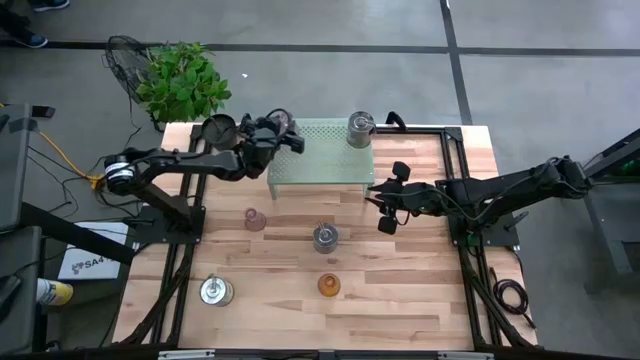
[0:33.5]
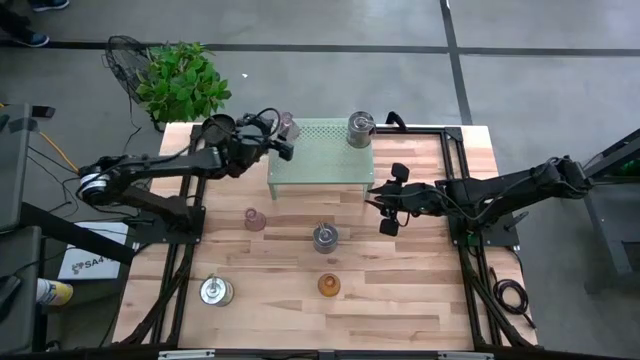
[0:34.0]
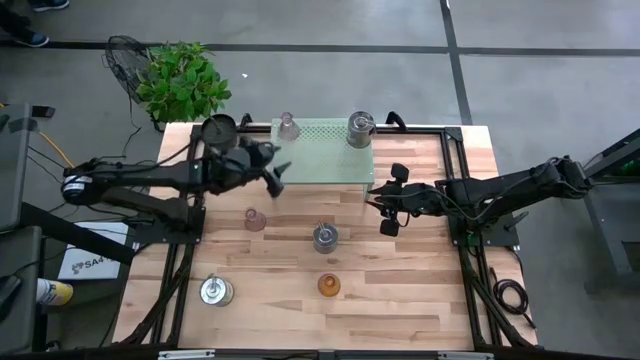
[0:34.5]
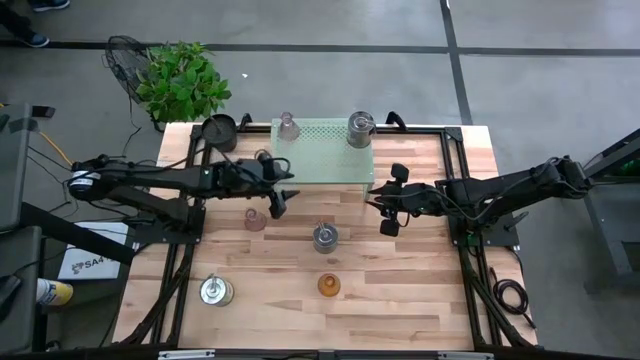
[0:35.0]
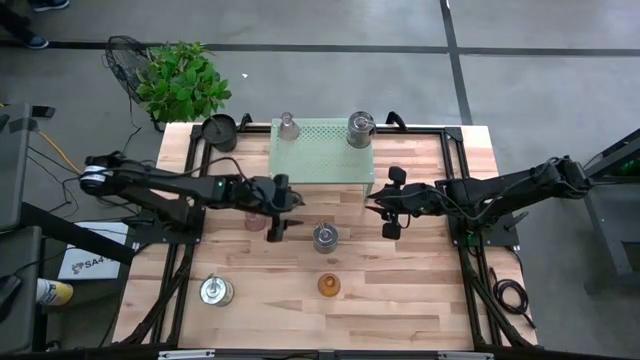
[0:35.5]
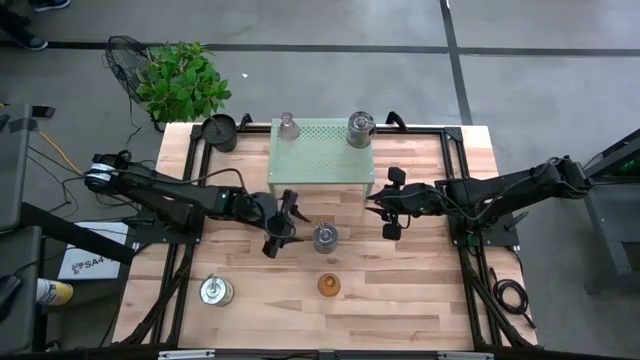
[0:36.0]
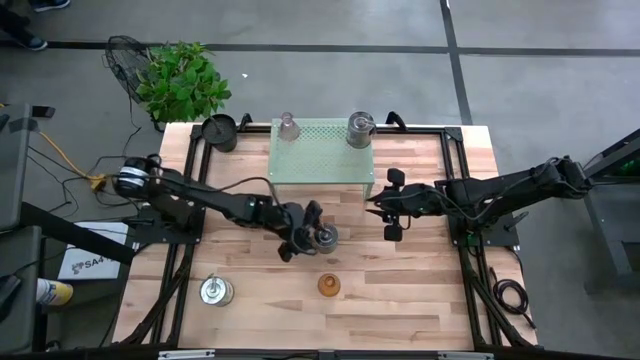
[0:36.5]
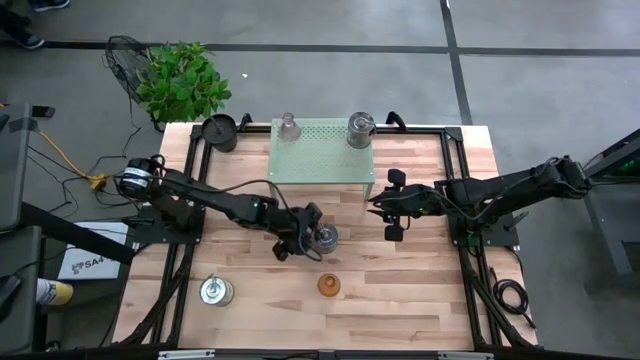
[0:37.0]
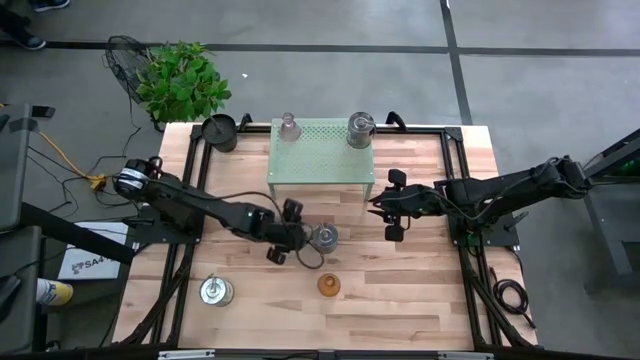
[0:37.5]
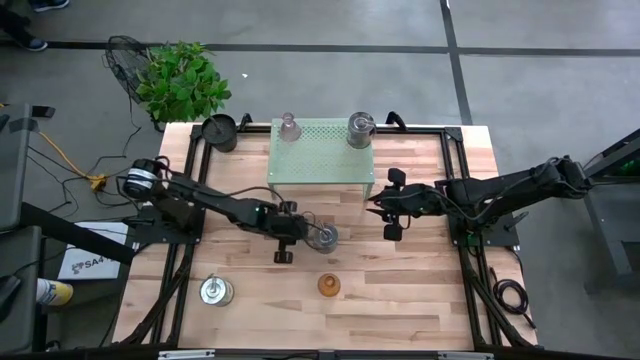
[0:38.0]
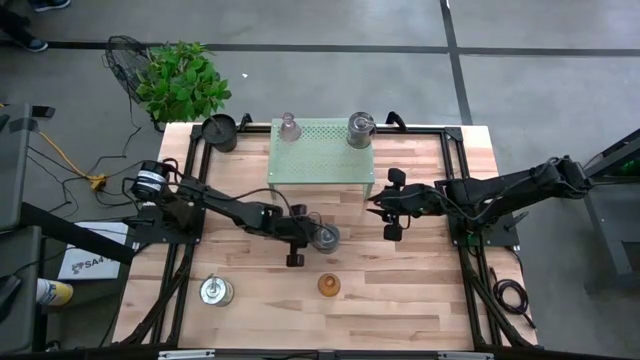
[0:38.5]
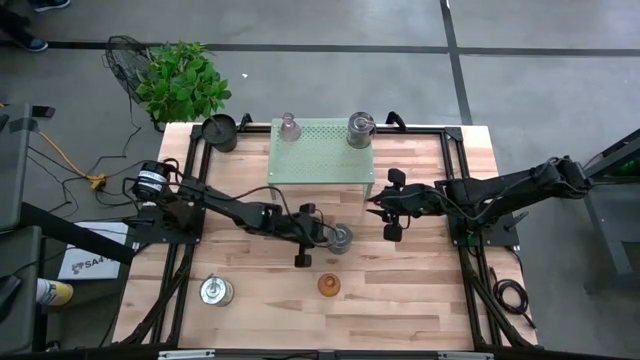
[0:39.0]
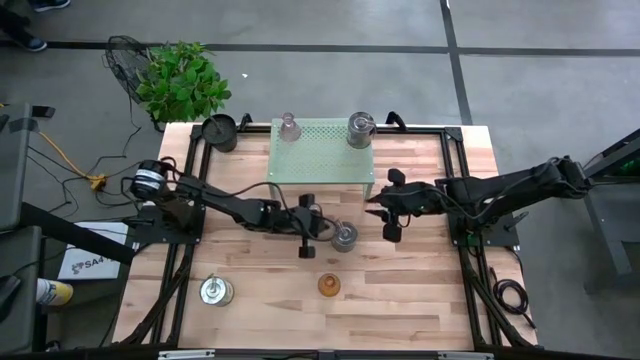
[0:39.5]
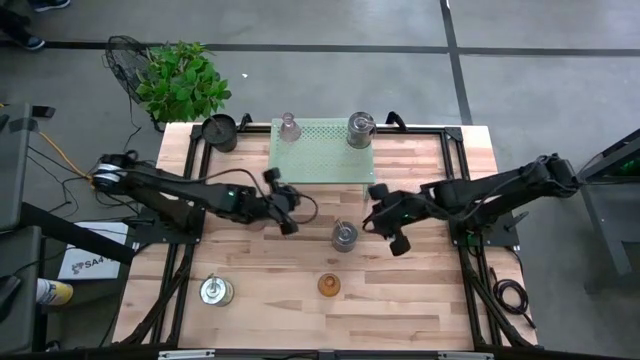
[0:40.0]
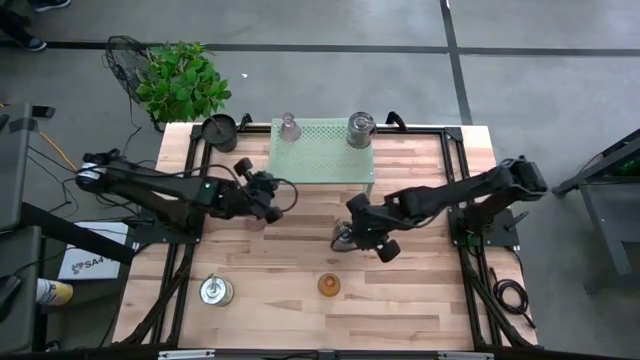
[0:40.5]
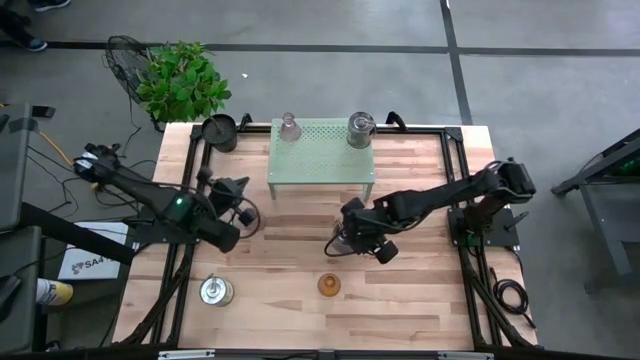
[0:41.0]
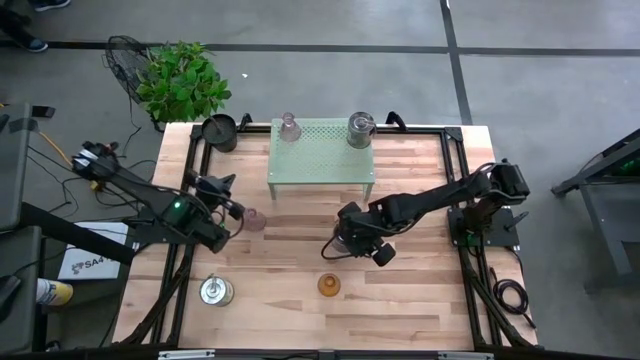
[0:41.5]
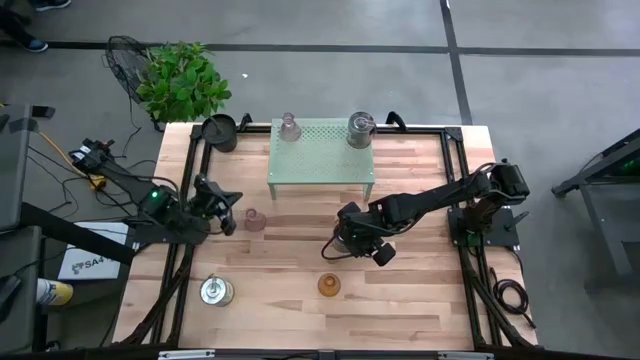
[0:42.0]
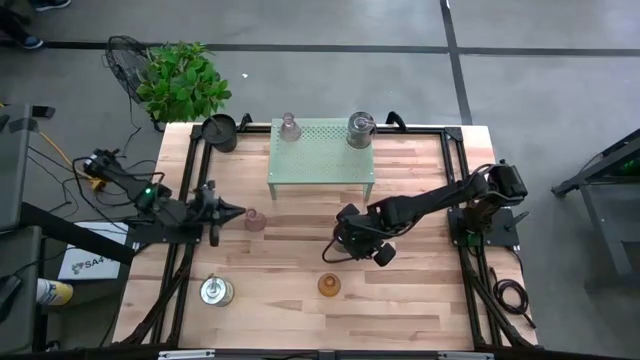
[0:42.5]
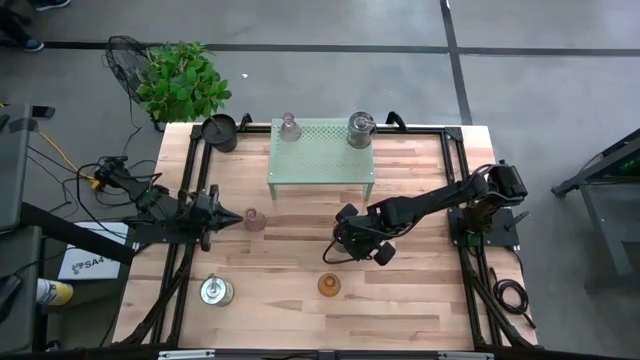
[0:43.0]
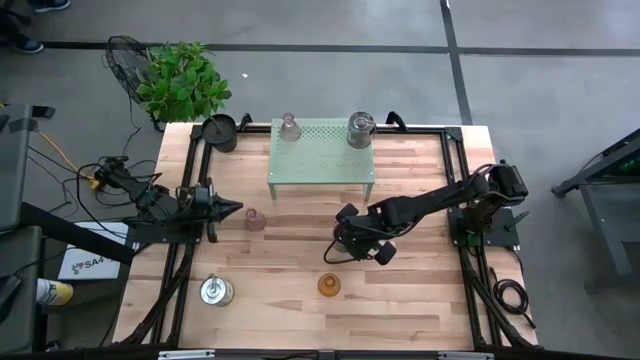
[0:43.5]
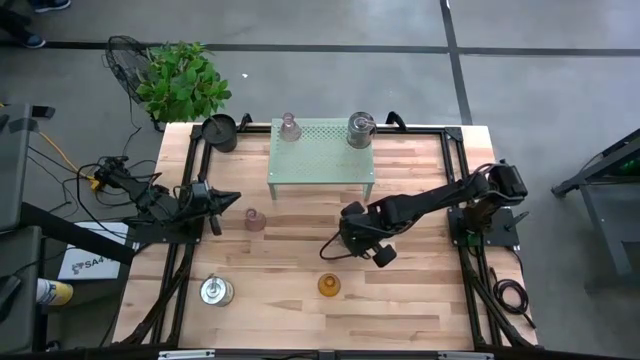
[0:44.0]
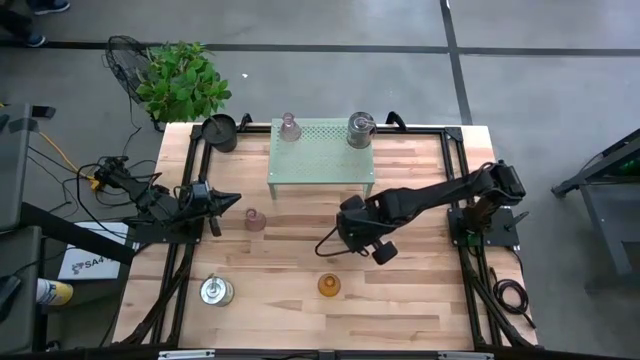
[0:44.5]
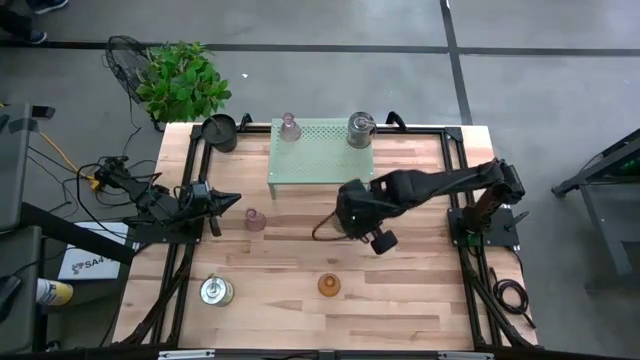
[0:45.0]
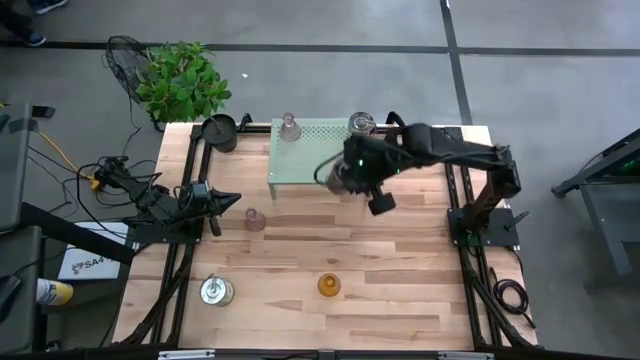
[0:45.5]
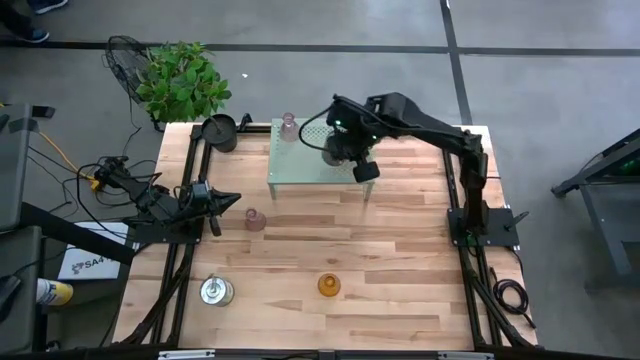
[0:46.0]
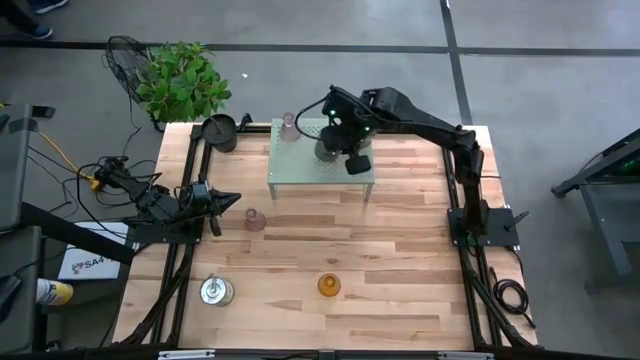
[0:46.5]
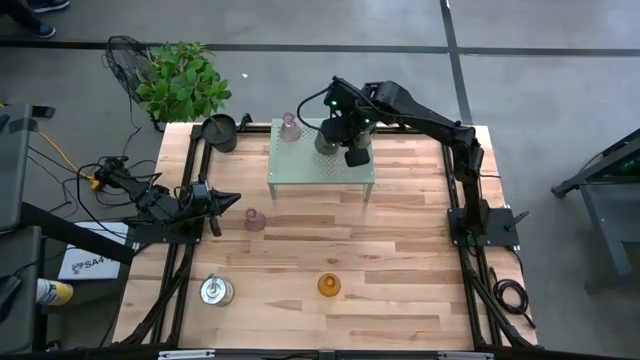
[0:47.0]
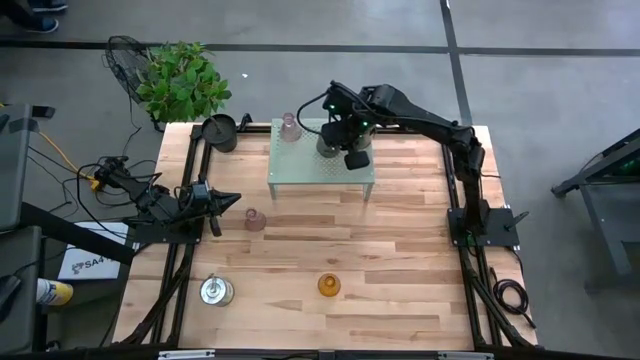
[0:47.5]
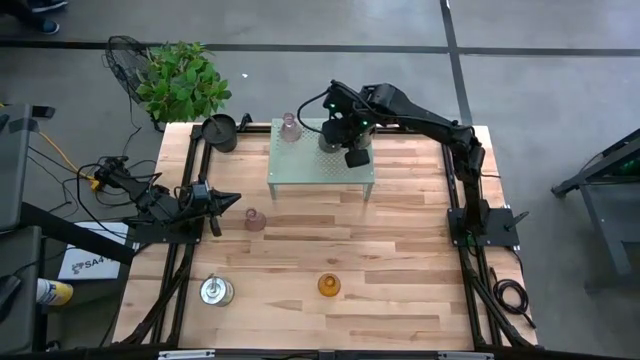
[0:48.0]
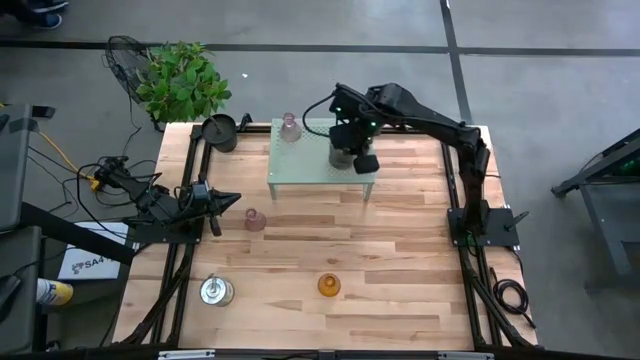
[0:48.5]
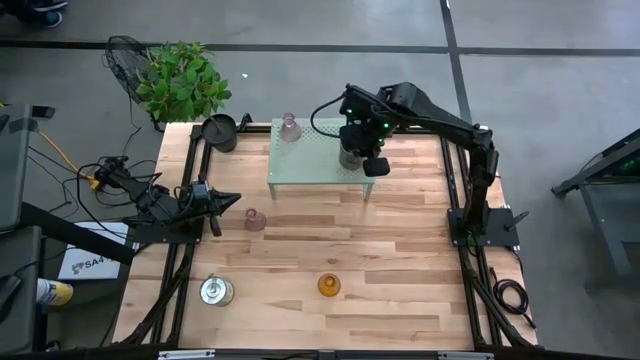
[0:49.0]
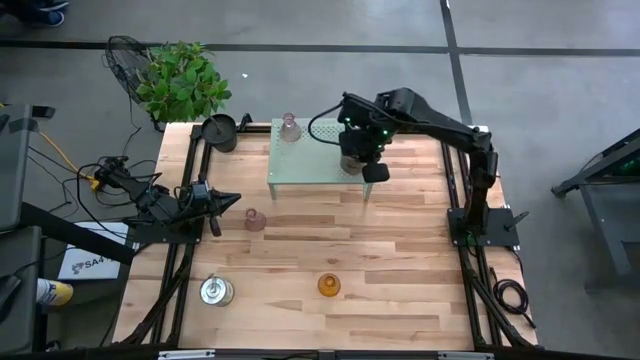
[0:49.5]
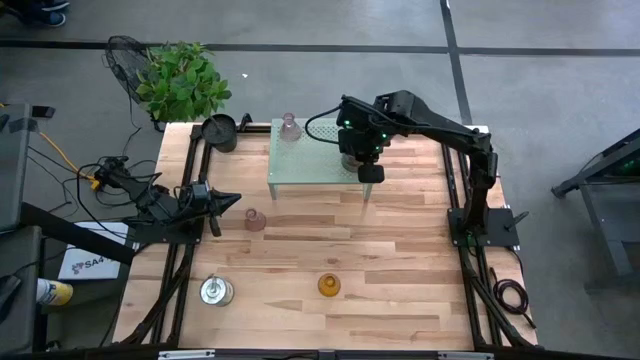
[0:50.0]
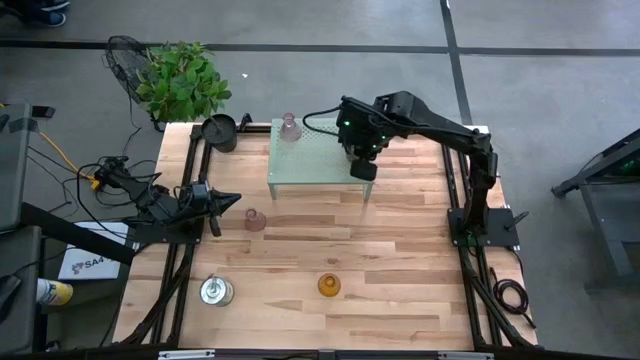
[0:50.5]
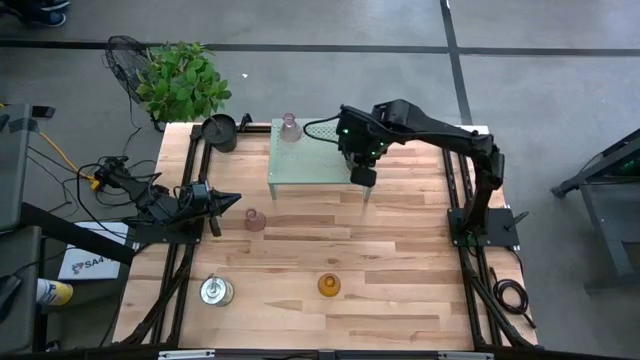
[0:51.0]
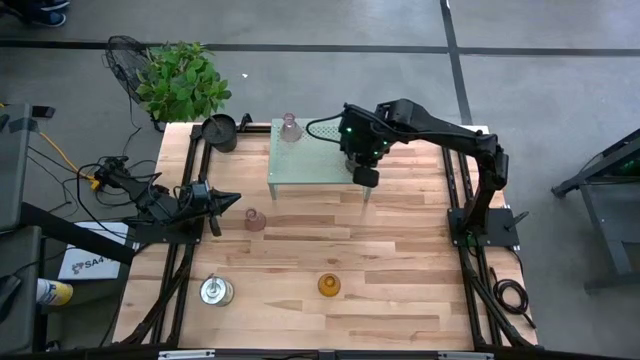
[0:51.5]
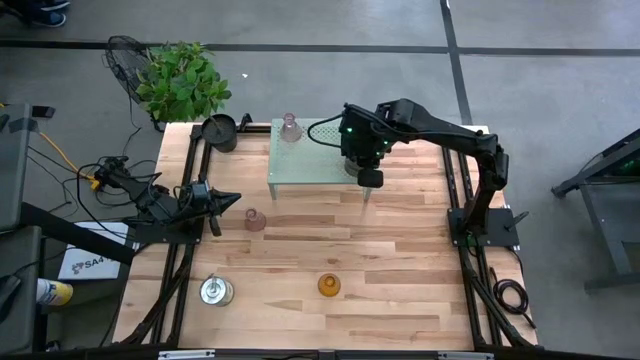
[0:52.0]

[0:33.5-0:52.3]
Task: Pick & Place candle stick holders
Put the top scented candle on the shelf

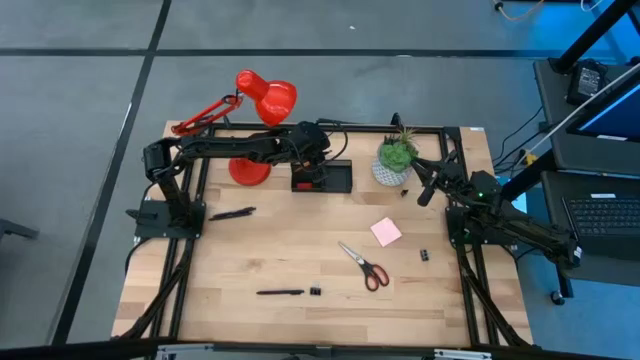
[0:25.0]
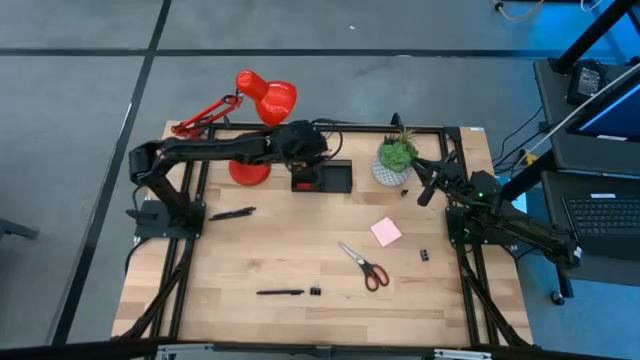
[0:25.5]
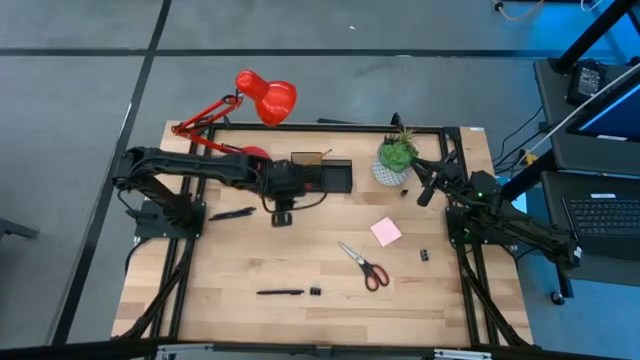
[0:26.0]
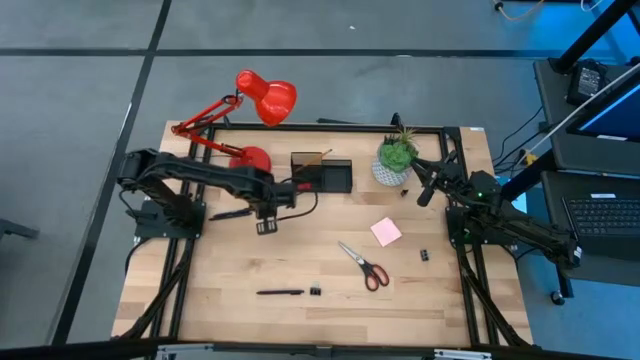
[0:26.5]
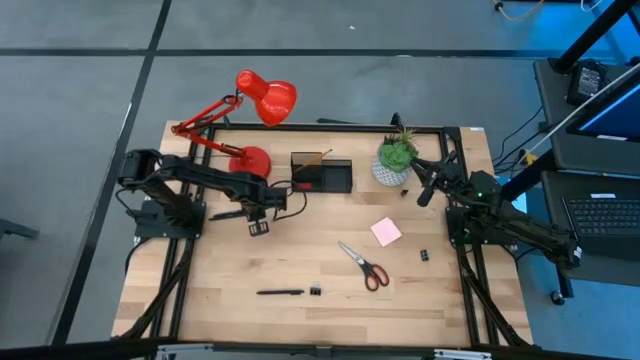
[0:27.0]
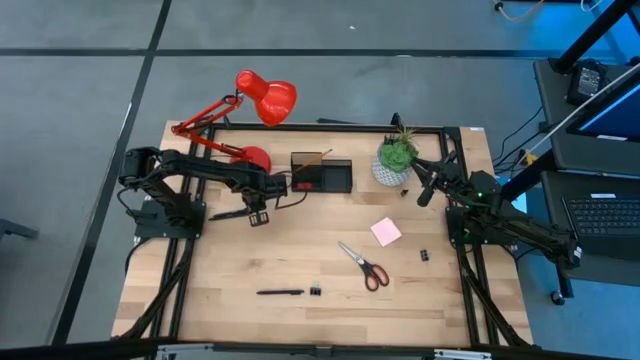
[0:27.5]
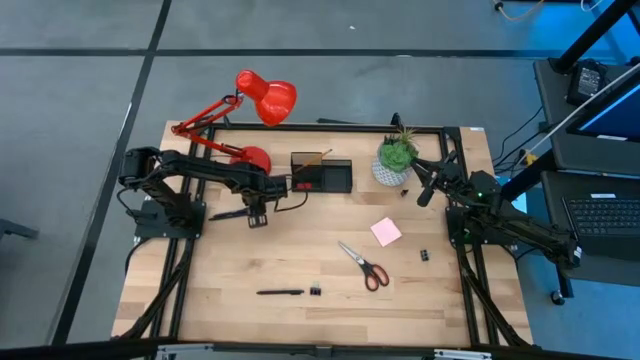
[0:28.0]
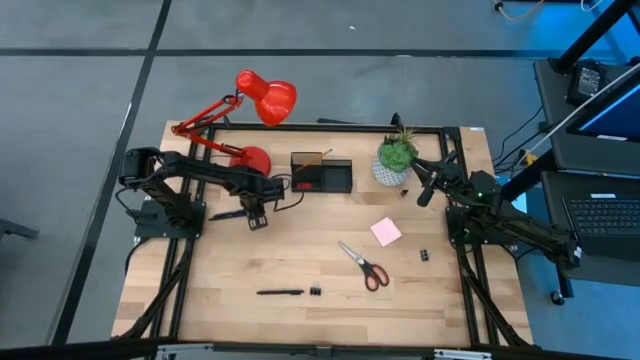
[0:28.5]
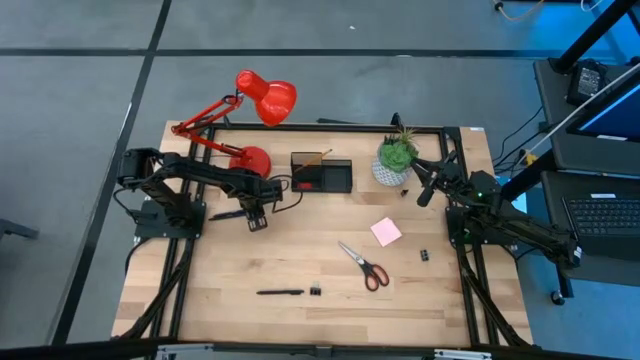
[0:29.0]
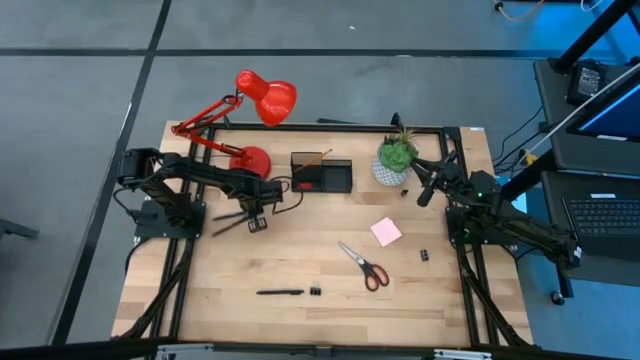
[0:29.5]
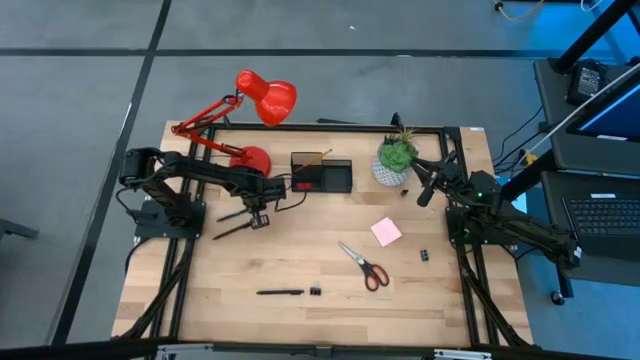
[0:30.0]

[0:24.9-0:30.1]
Task: Pick and place office supplies into organizer
Put the top pen into the desk organizer
